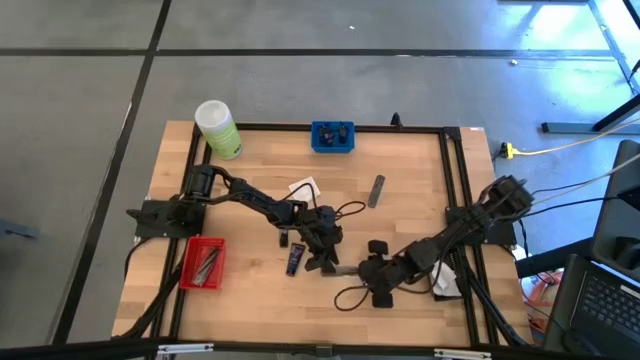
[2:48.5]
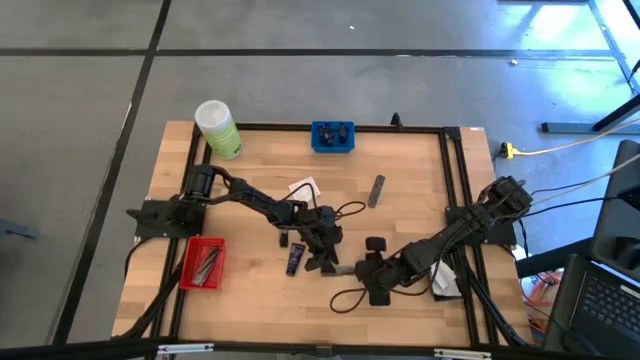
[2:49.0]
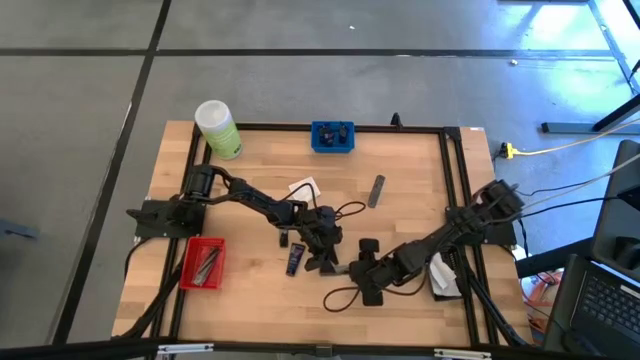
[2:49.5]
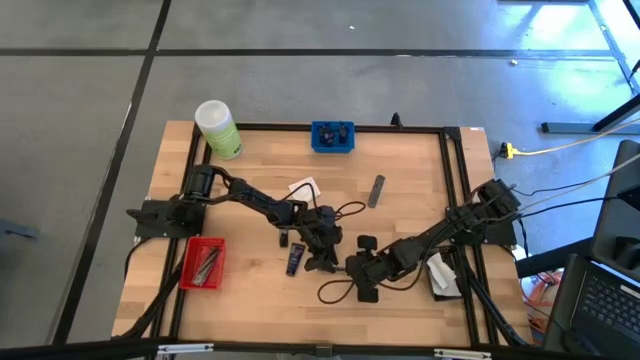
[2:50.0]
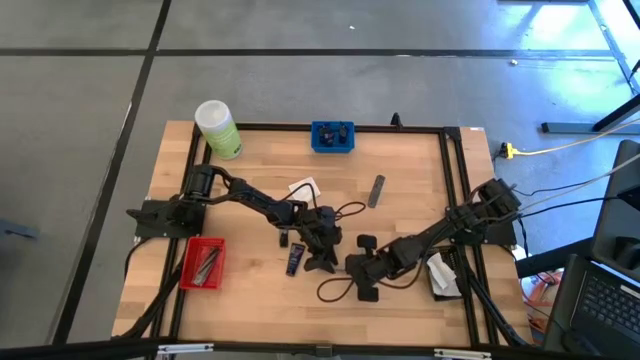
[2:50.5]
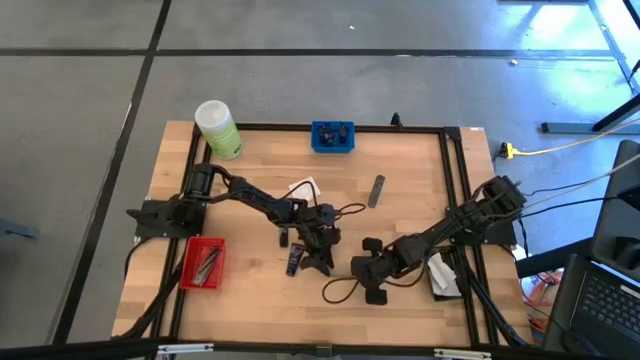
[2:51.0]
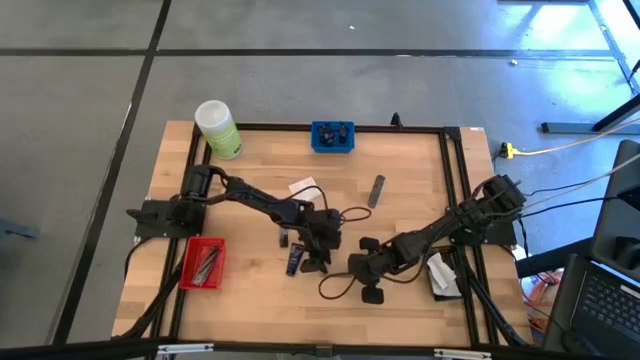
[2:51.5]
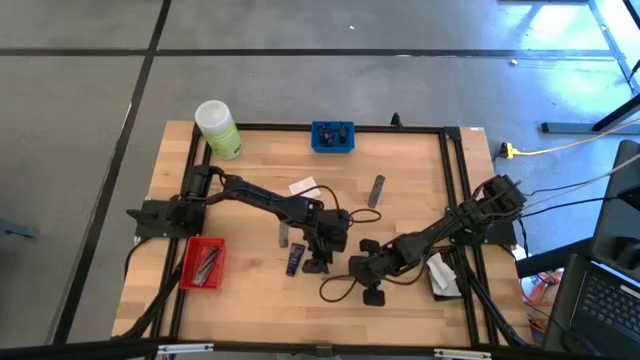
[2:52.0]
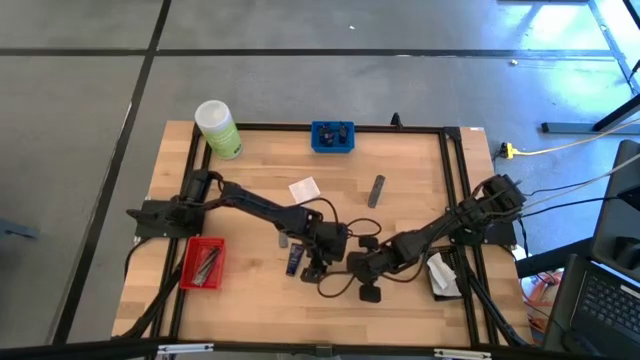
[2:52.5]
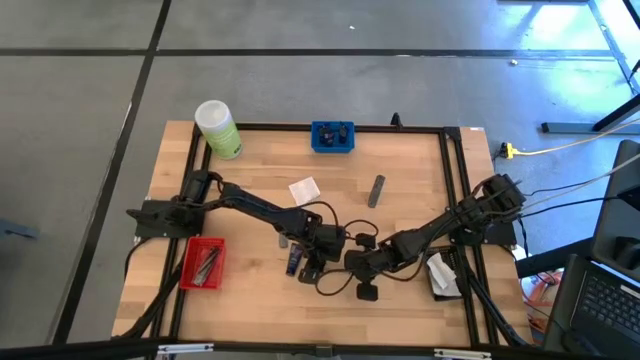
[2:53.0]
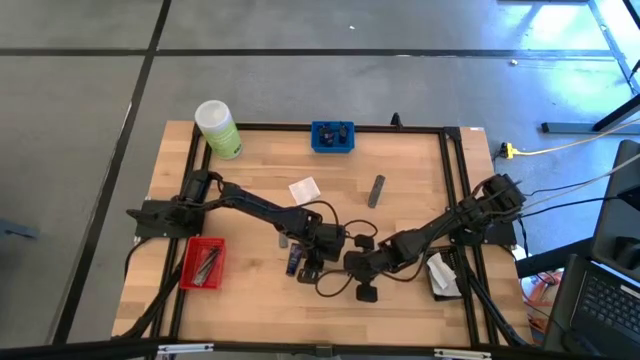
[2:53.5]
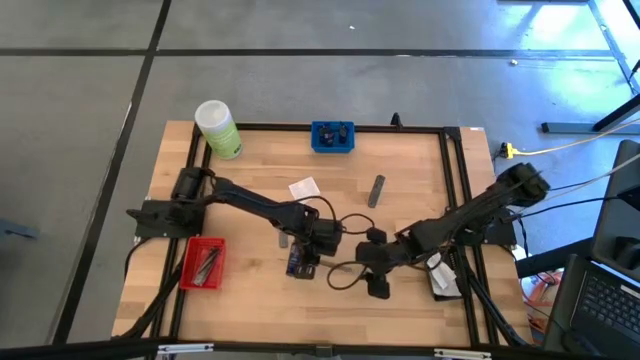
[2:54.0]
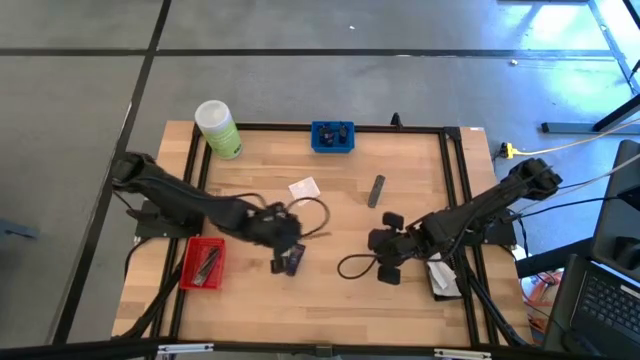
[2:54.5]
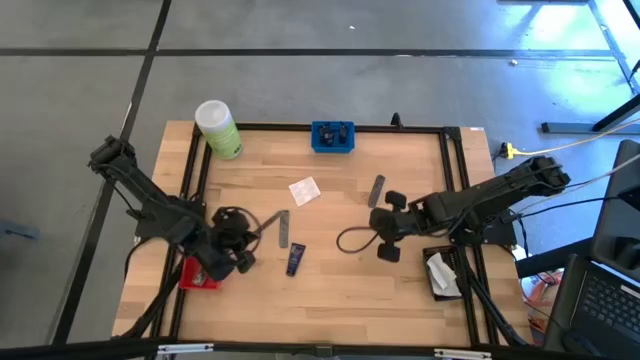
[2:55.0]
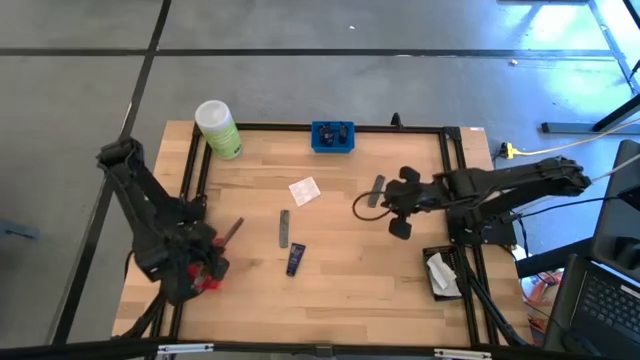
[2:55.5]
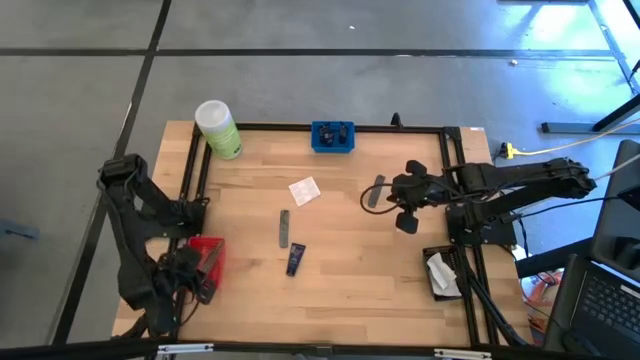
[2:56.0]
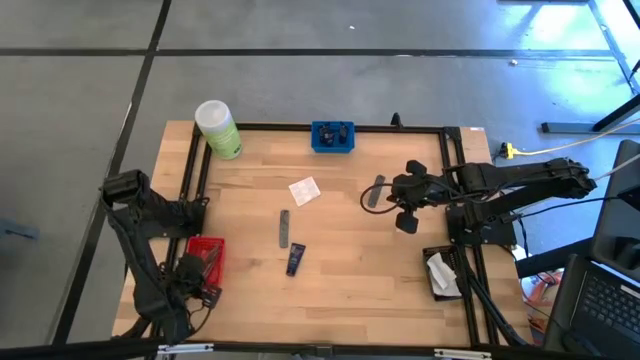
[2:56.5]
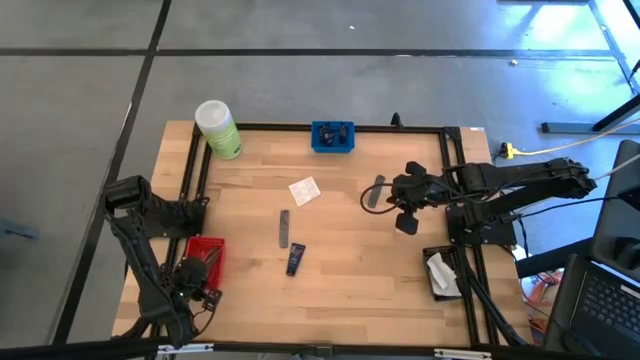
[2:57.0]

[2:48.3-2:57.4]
Task: Pick & Place Travel size toiletries
Put the black hair comb into the red basket

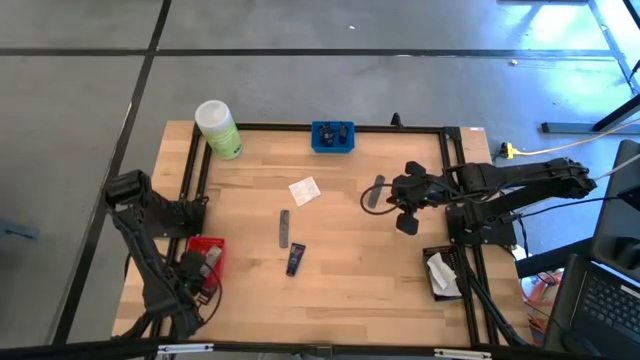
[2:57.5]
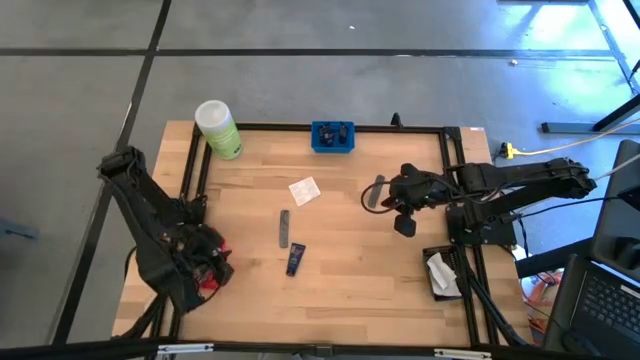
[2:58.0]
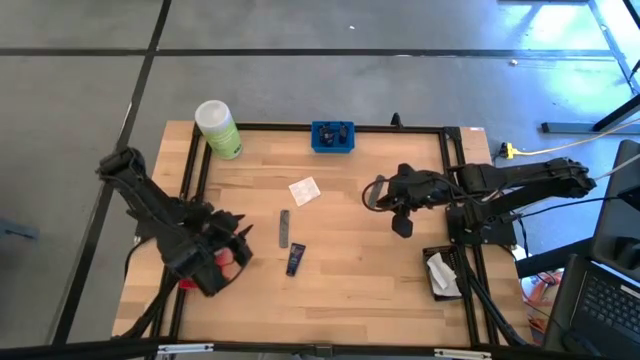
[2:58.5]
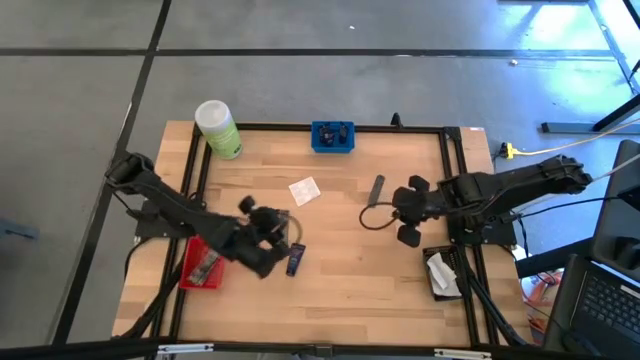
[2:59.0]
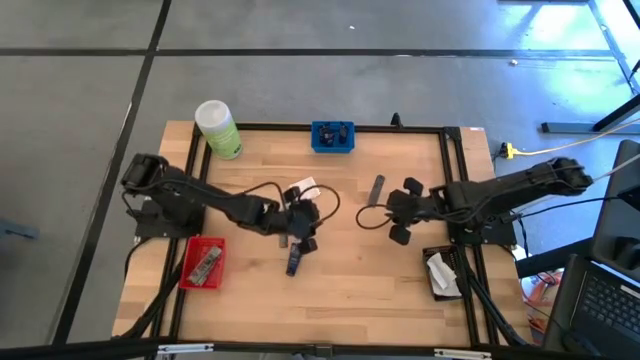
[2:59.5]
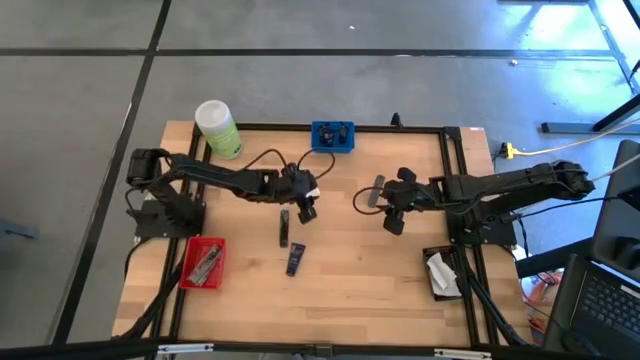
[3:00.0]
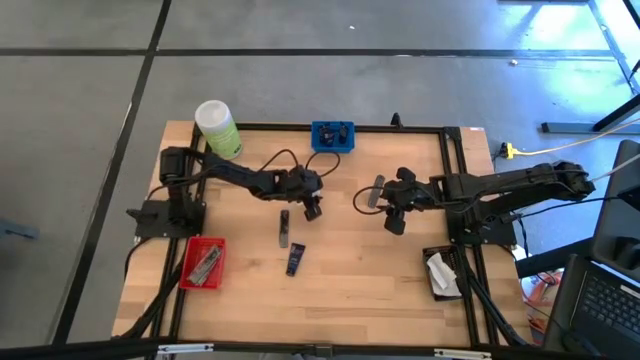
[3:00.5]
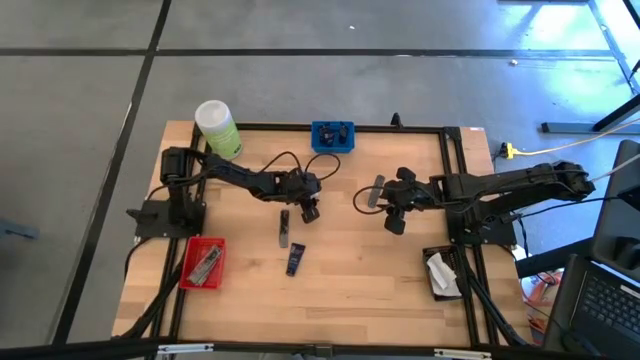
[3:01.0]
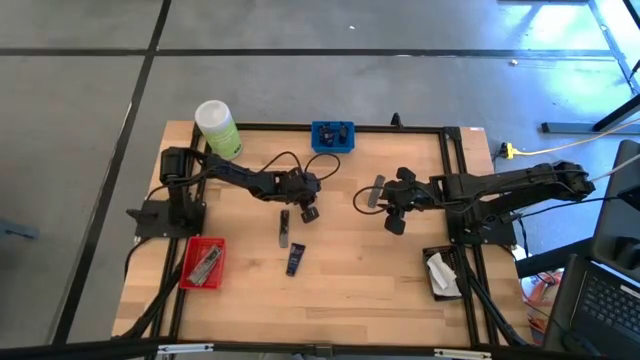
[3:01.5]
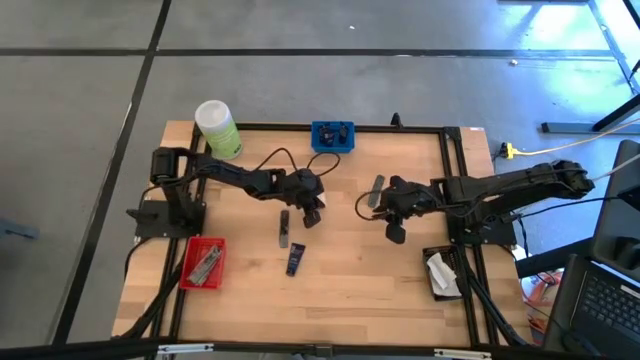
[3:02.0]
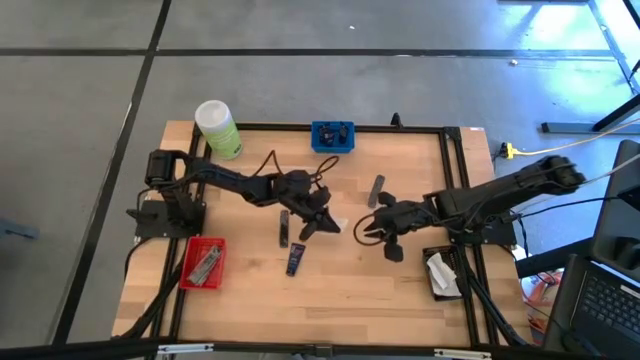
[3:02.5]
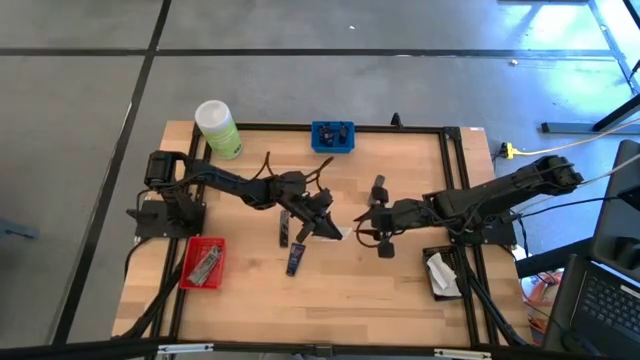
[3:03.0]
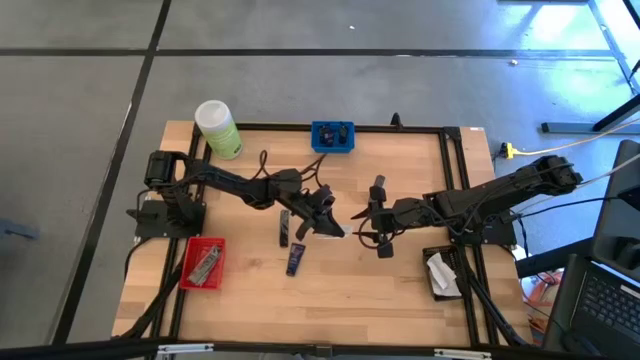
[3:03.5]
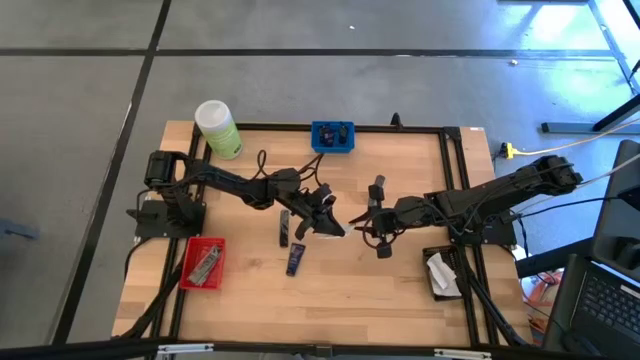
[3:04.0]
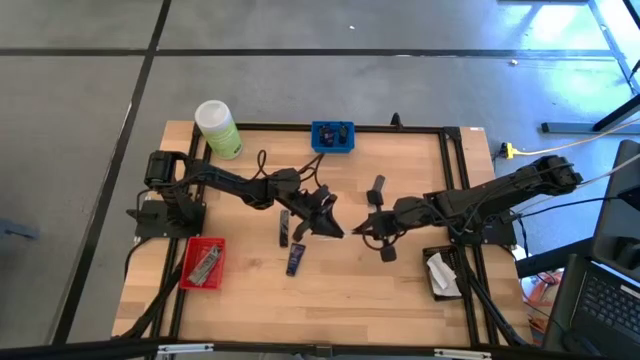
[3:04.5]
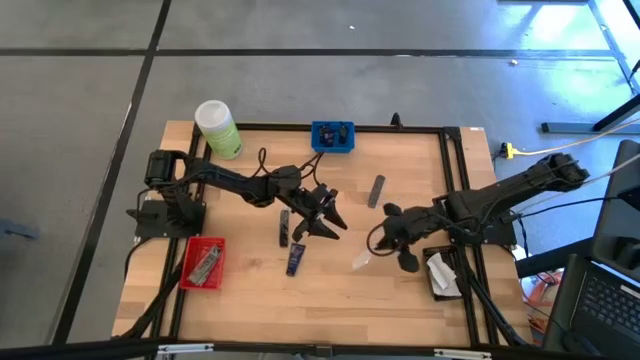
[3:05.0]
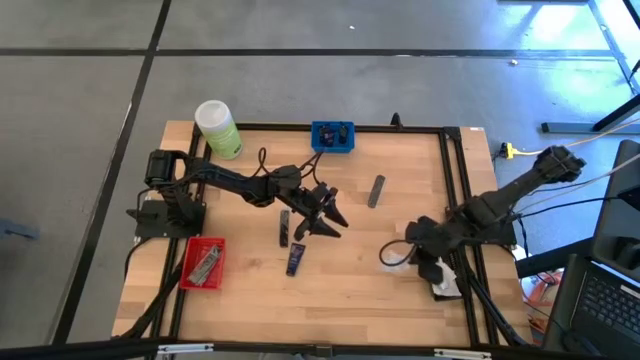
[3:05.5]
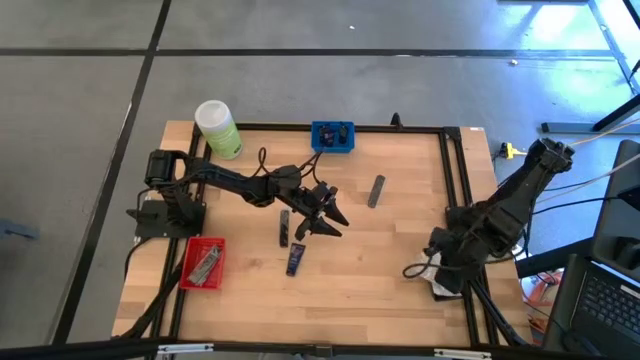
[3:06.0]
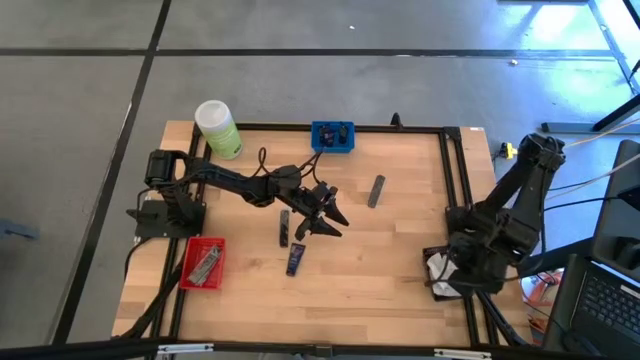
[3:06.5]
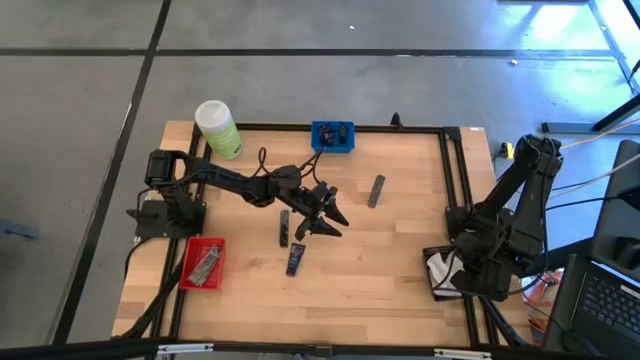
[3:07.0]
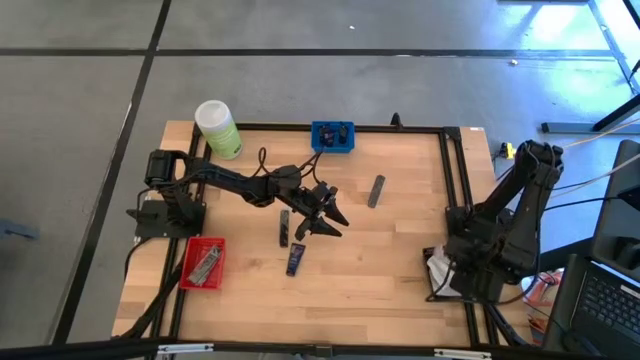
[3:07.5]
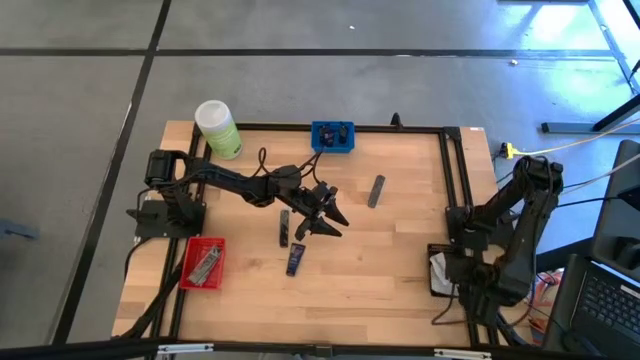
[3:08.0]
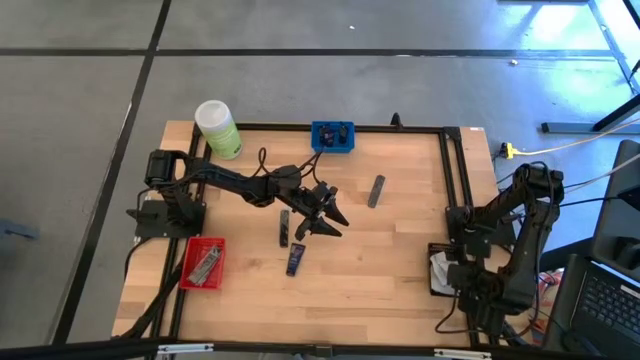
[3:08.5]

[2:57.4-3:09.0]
Put the white bandage pad into the black basket
